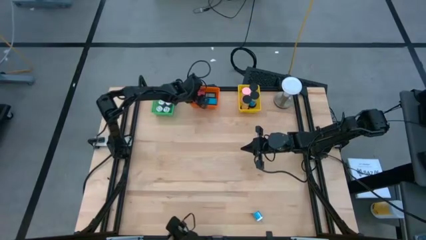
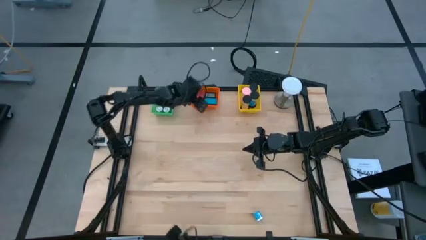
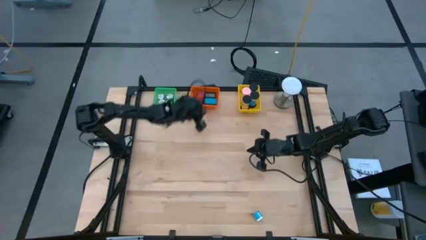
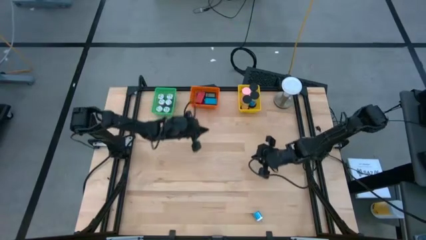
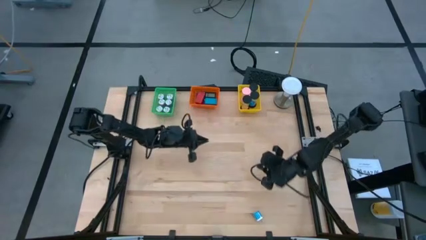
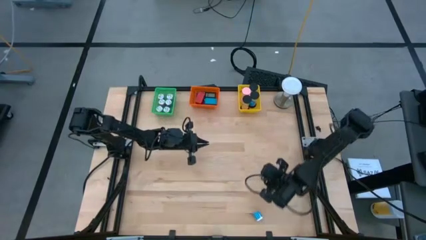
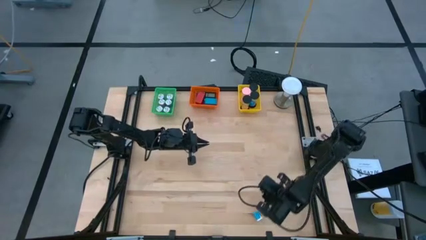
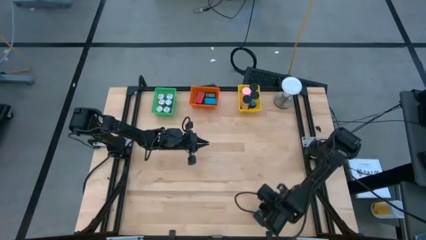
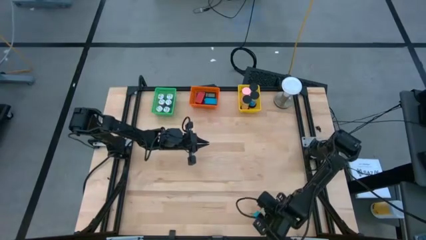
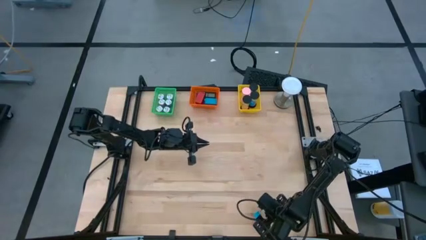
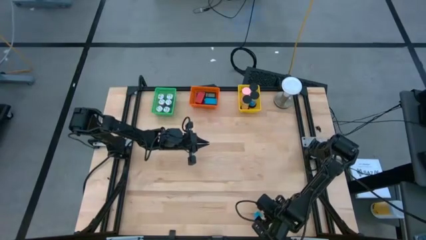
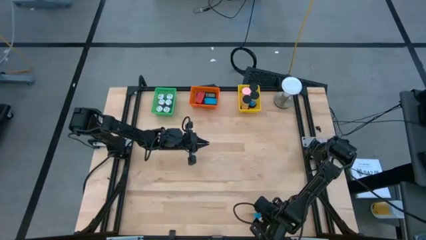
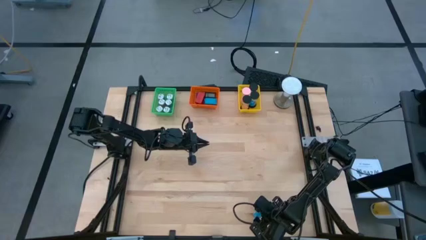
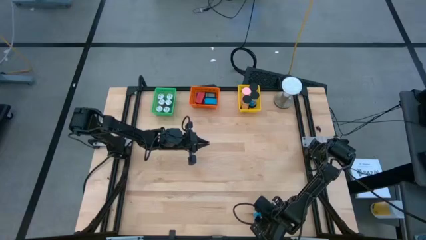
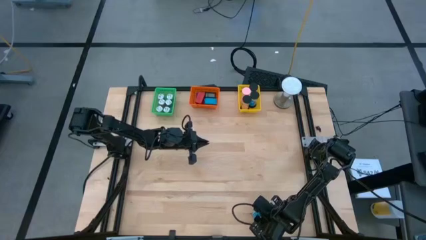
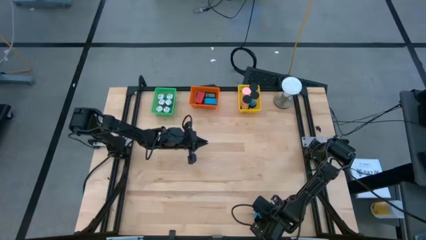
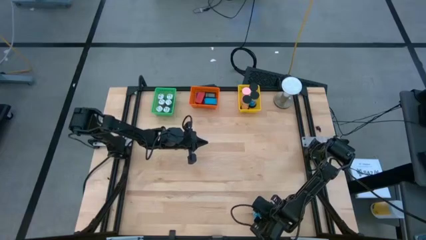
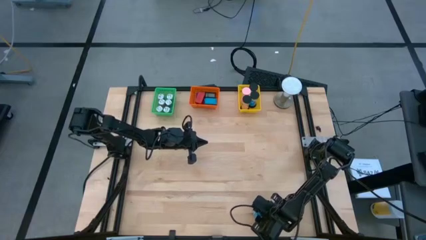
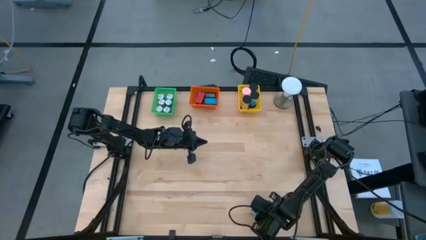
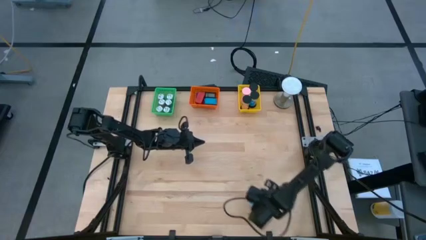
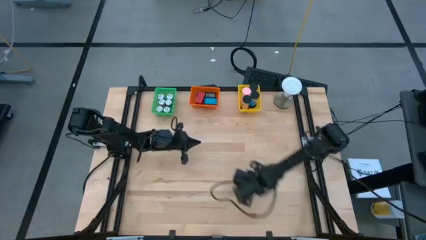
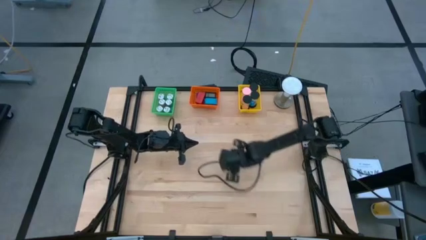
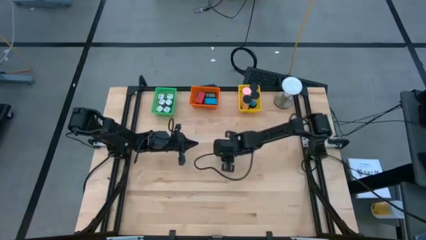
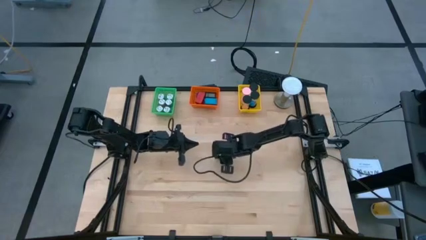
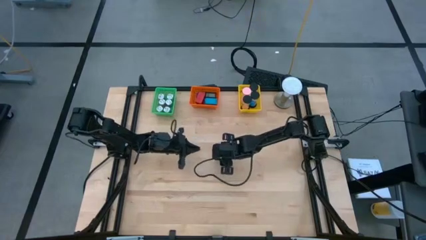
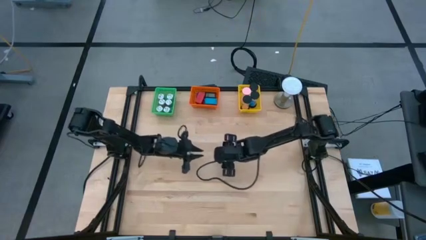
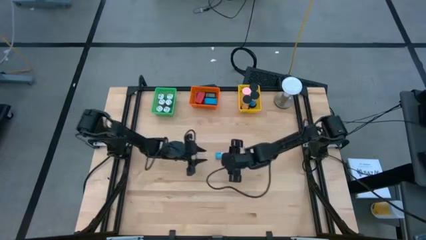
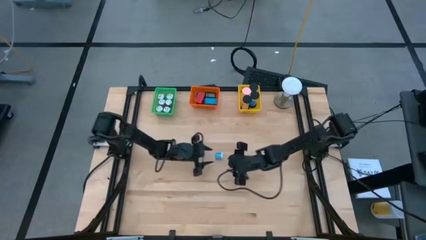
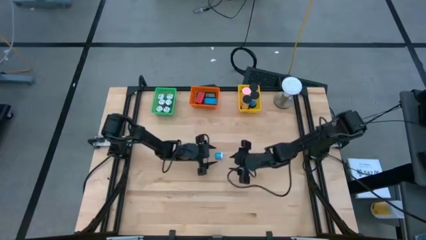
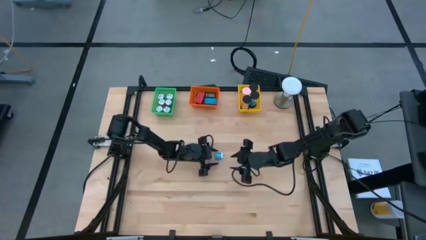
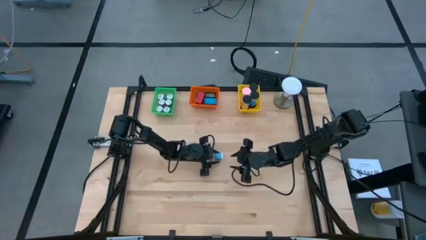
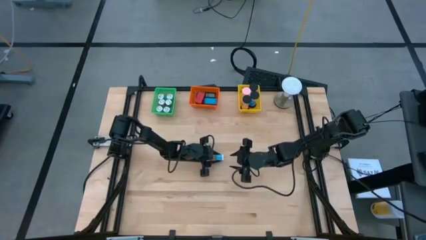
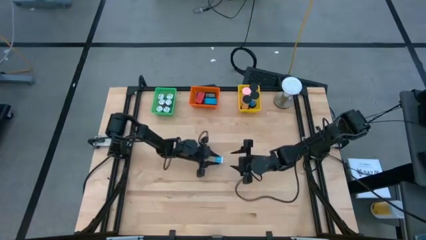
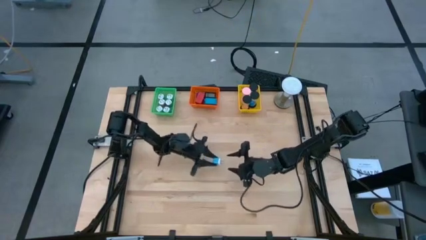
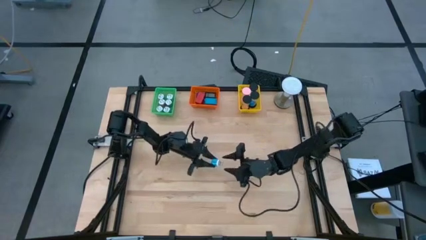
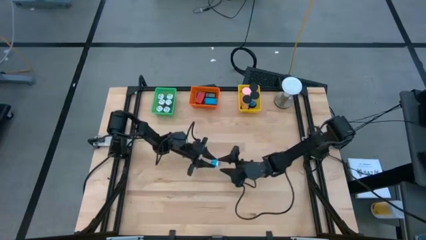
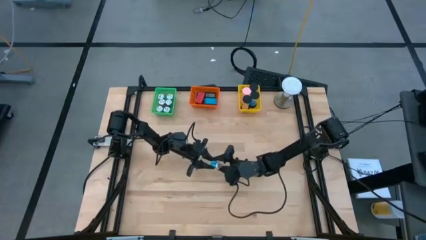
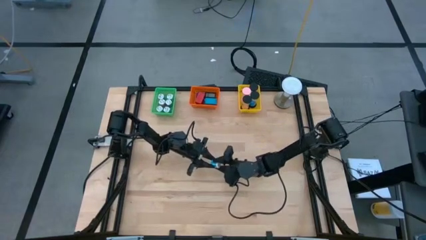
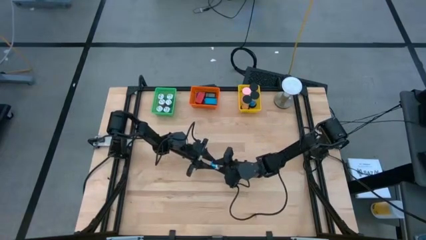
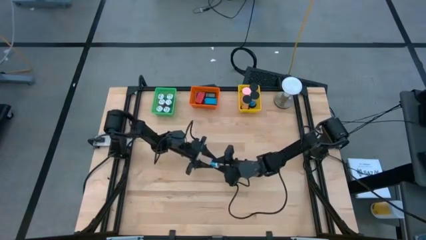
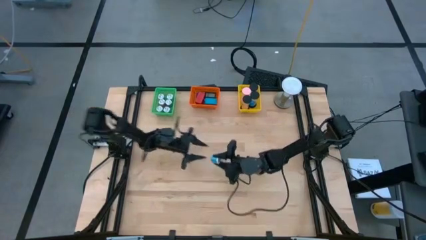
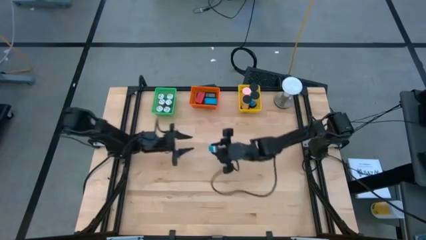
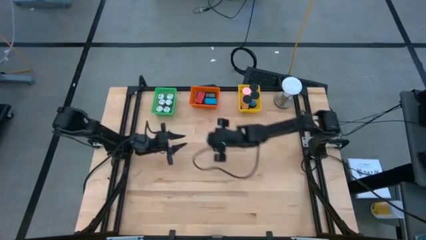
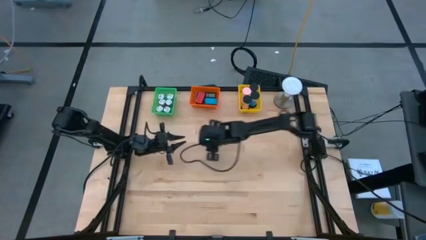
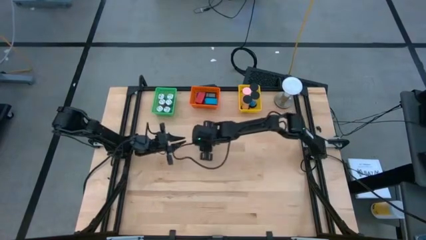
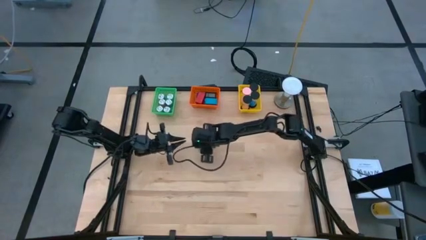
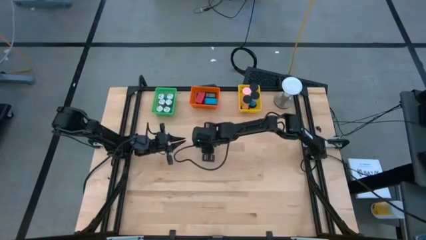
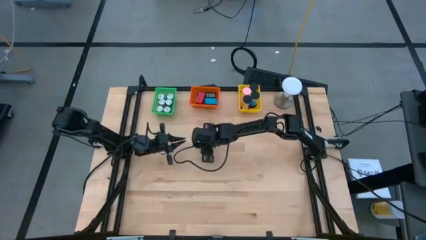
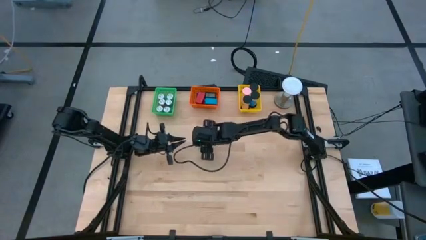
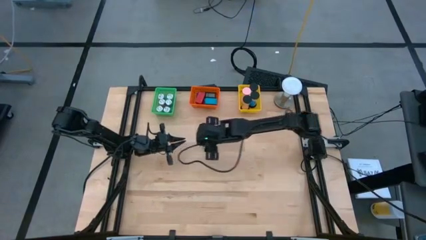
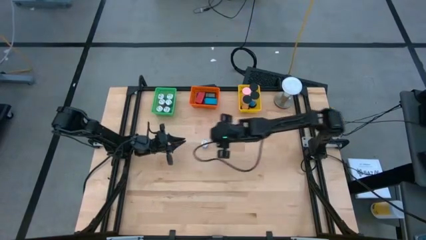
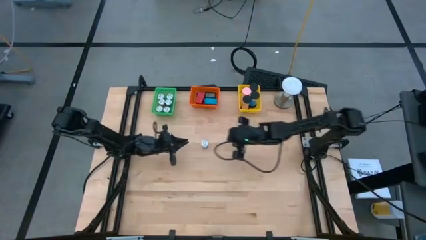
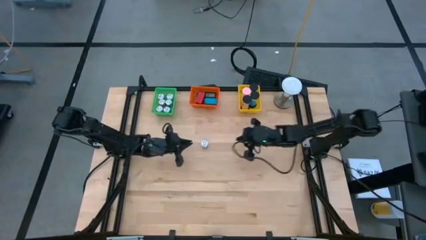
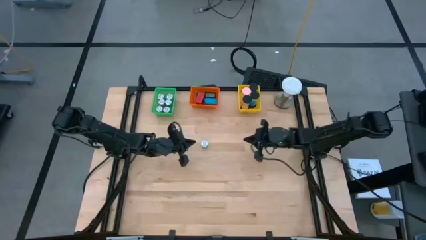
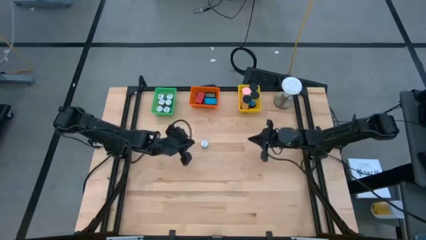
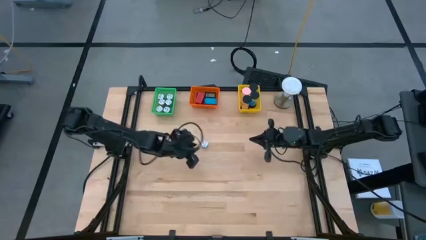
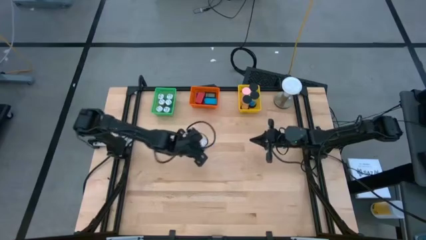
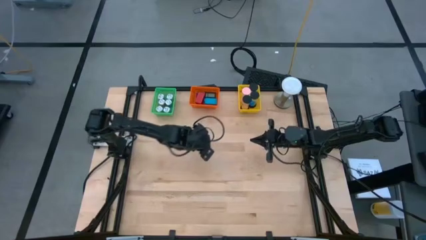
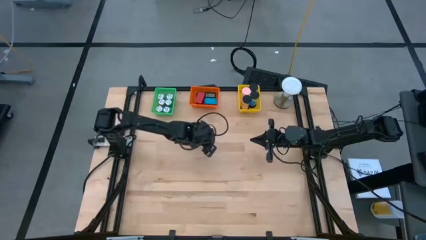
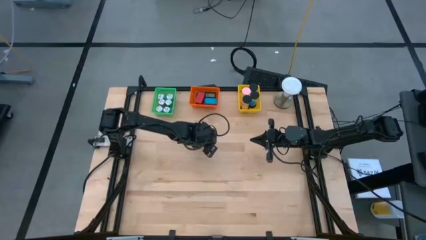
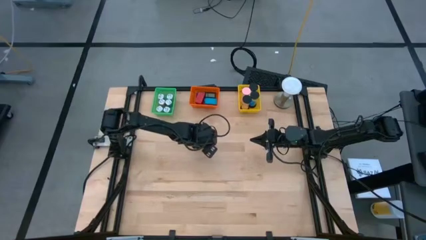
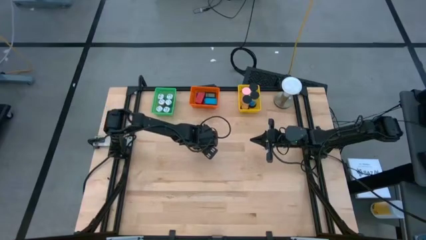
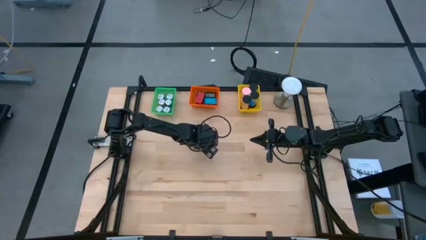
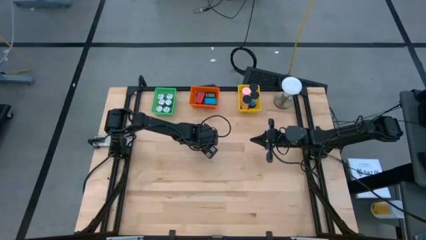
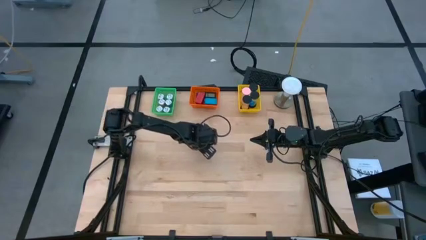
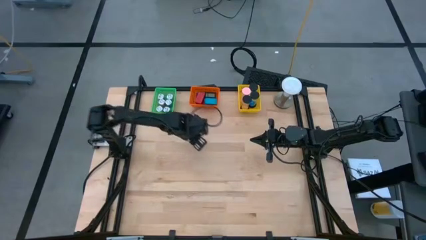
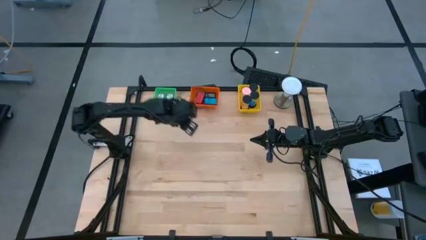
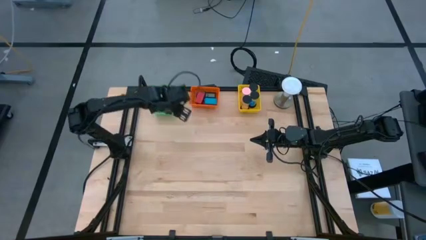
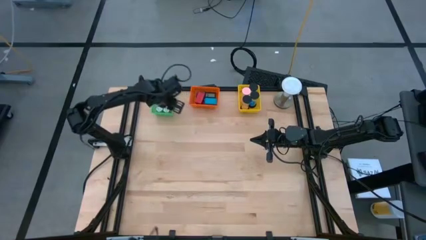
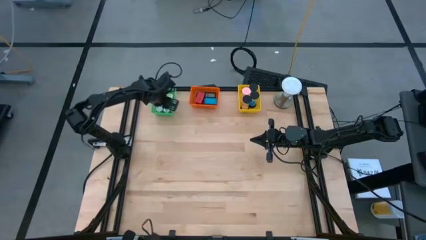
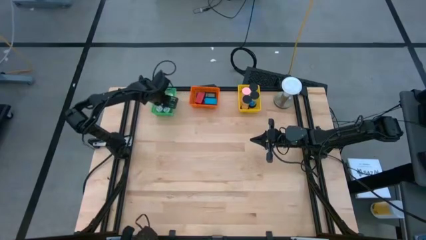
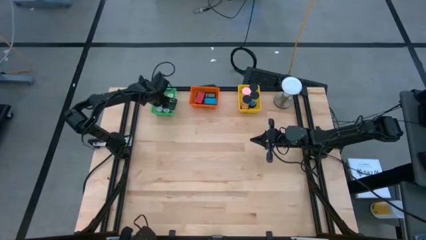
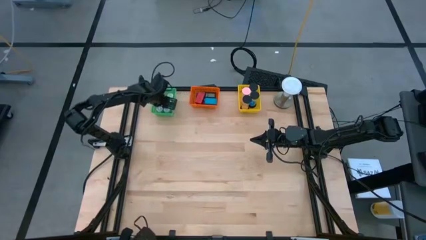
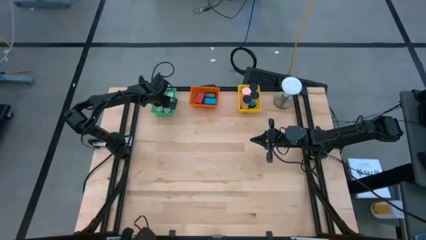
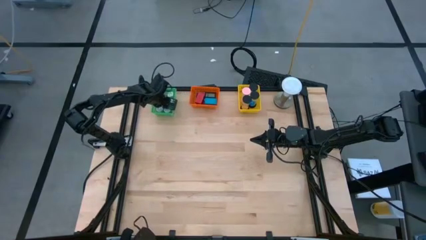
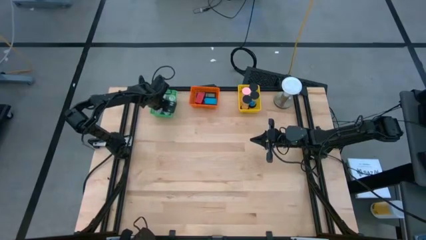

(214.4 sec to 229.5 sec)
Task: Pick & Place Office items
Put the blue charger adaptor into the green bin

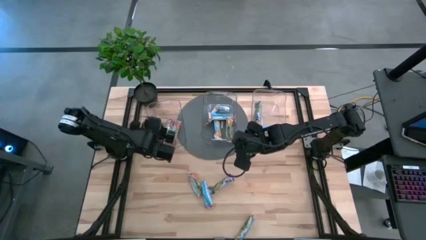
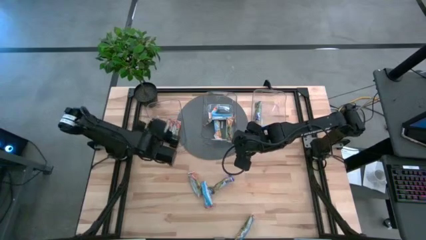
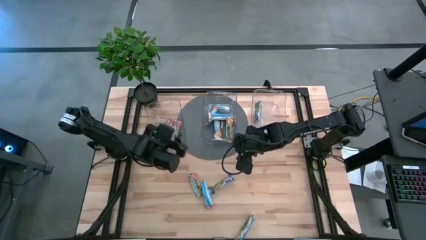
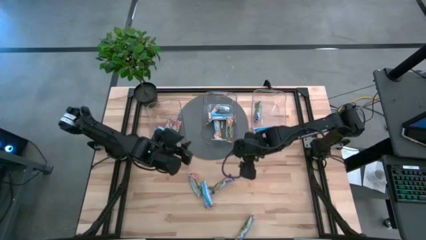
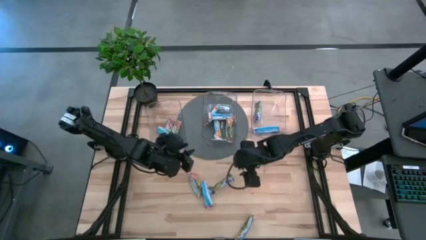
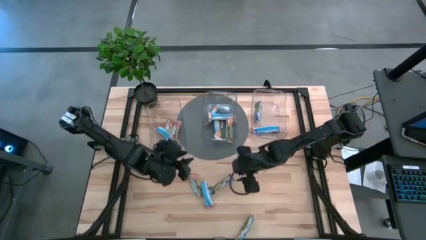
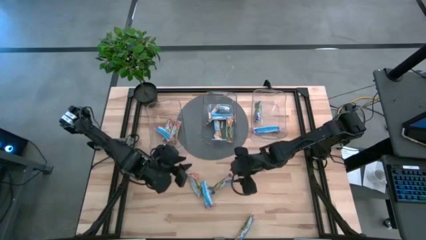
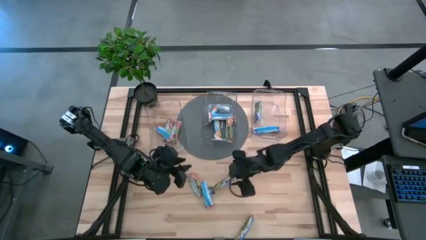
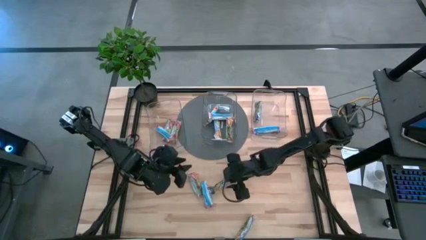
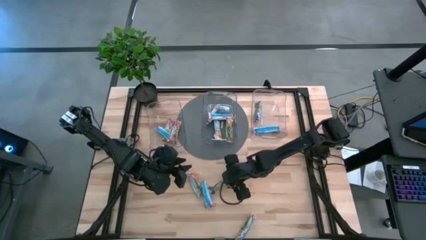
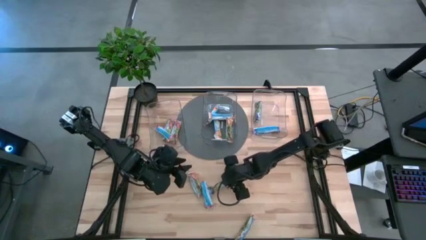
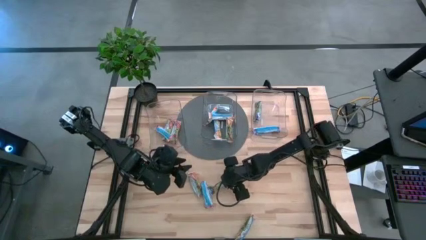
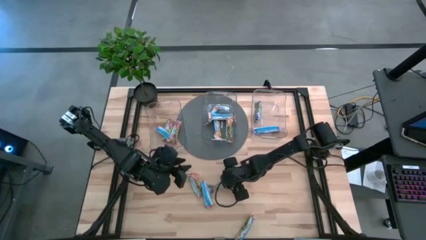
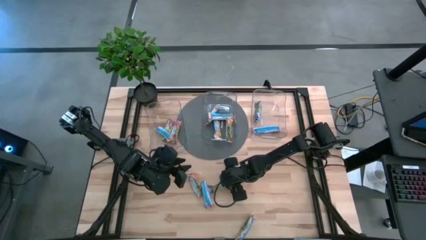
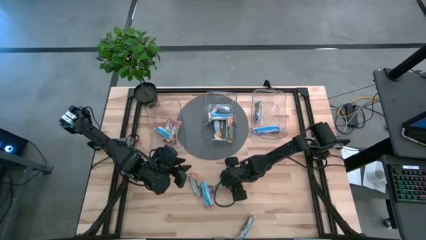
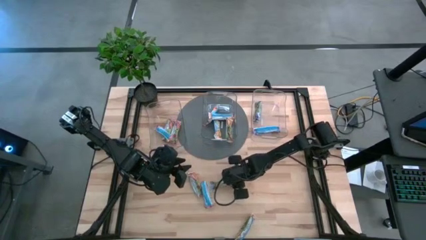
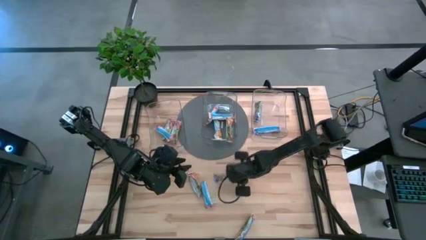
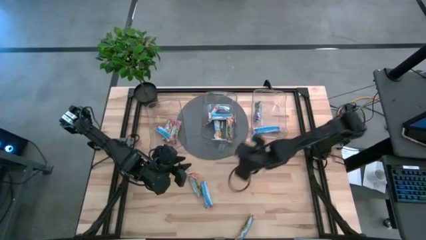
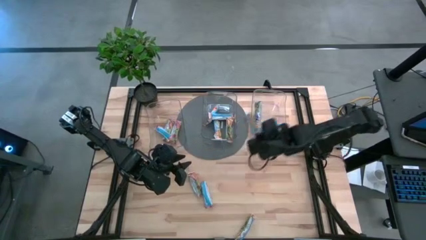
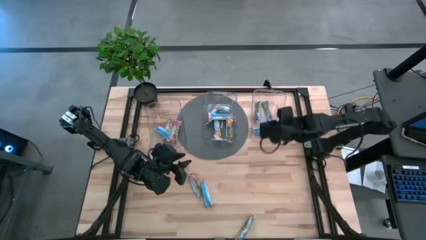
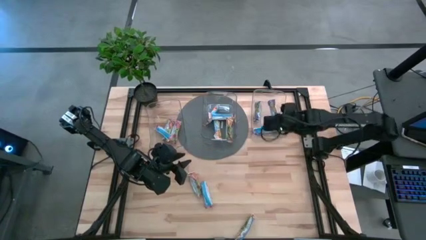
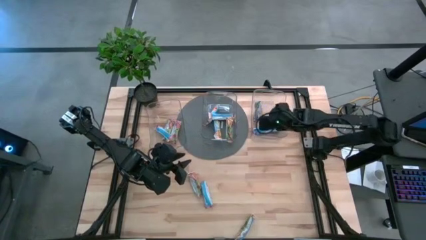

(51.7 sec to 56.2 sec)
Task: Pick and place Granola Bars by type
Put the blue granola bar into the right transparent bin
